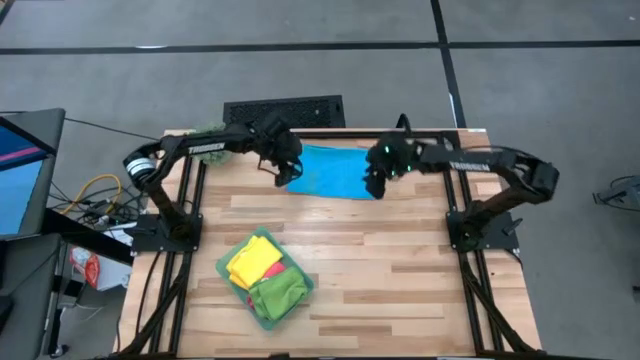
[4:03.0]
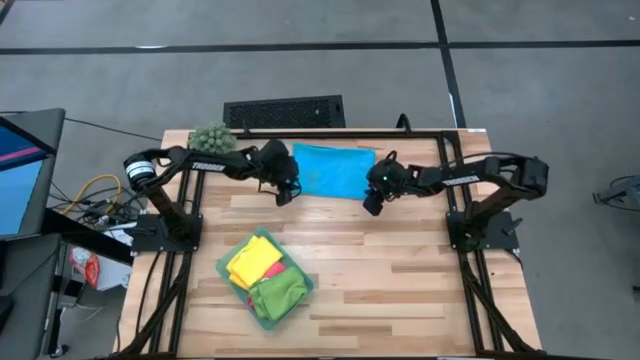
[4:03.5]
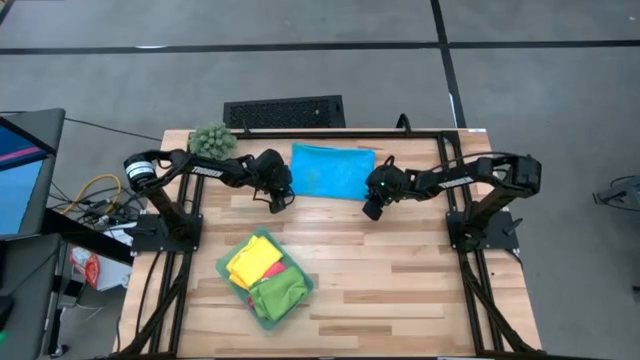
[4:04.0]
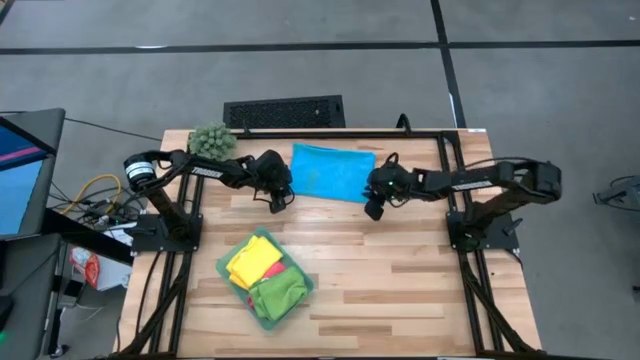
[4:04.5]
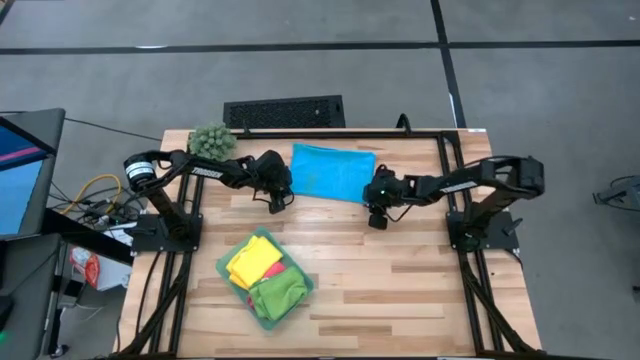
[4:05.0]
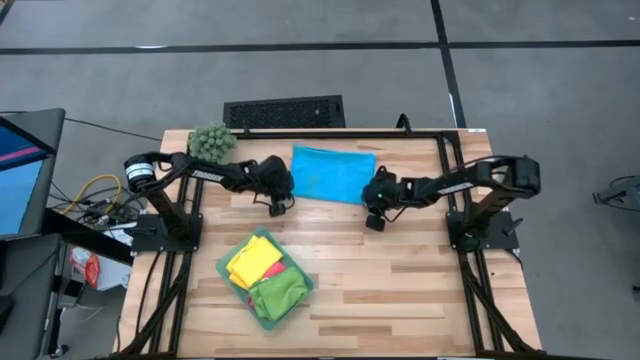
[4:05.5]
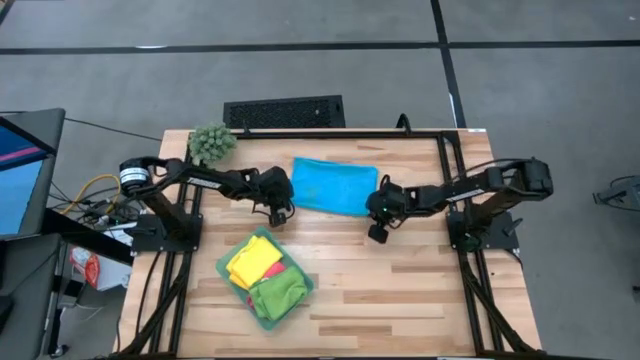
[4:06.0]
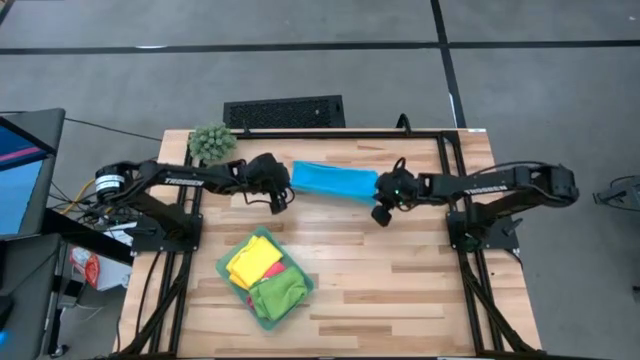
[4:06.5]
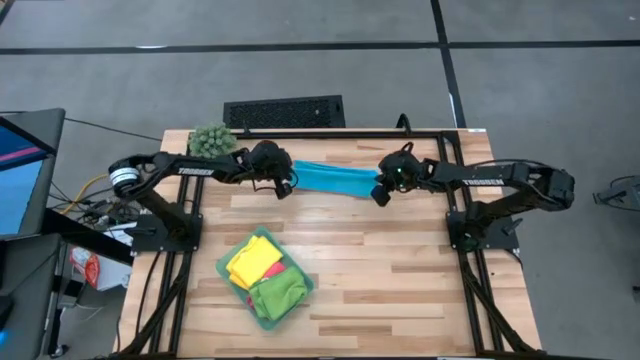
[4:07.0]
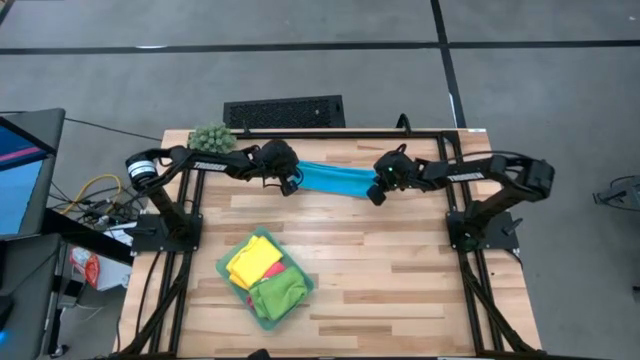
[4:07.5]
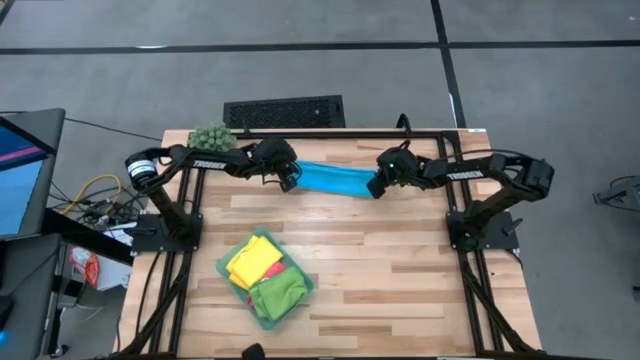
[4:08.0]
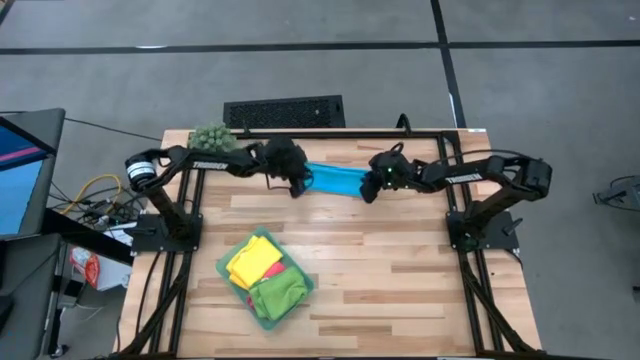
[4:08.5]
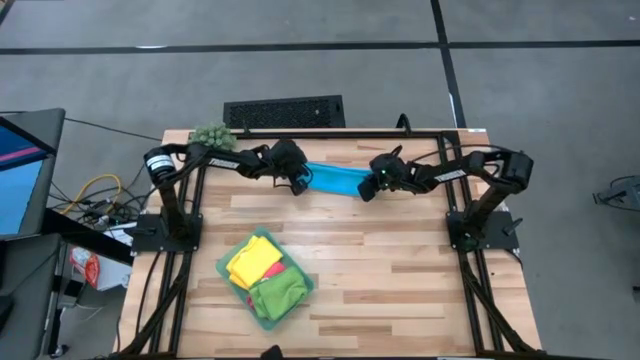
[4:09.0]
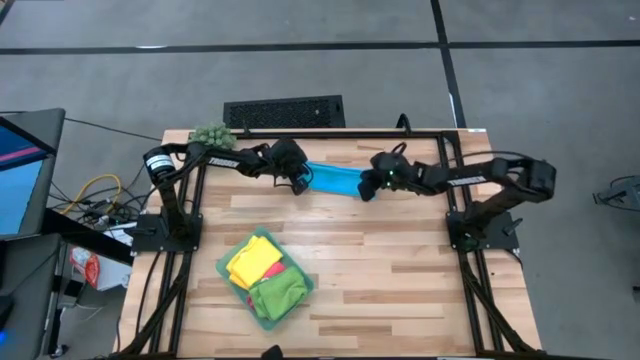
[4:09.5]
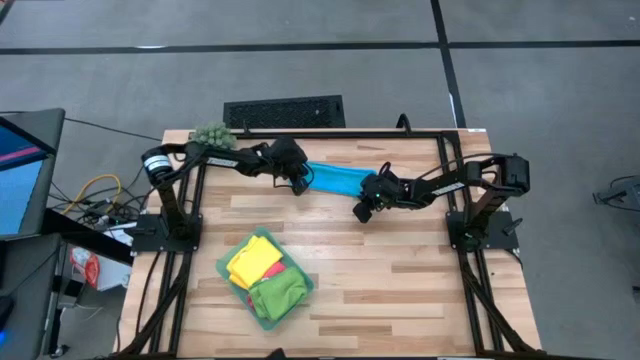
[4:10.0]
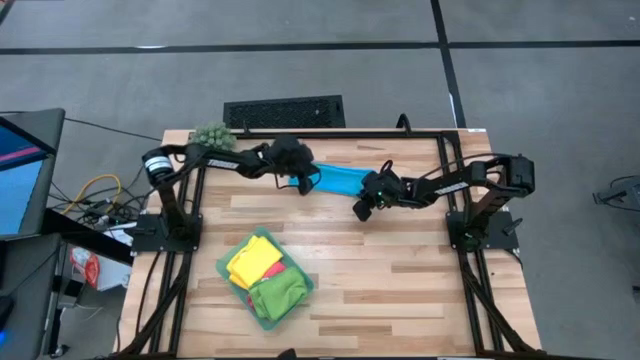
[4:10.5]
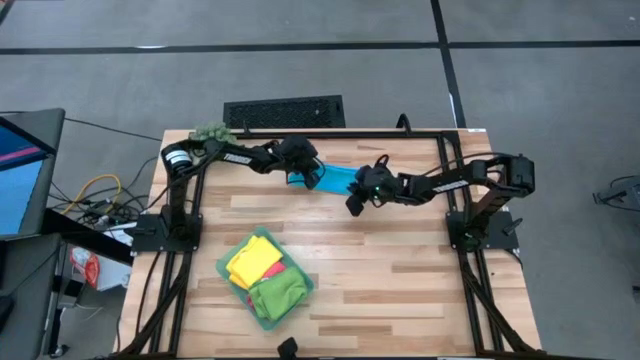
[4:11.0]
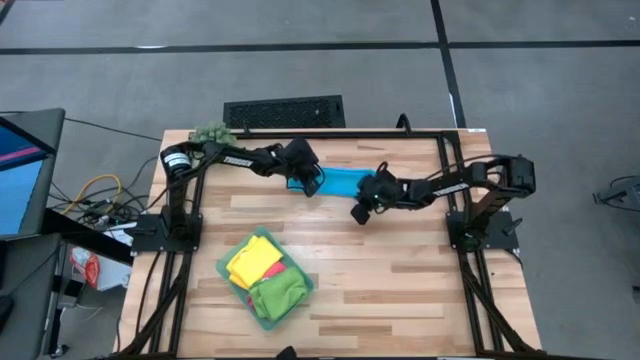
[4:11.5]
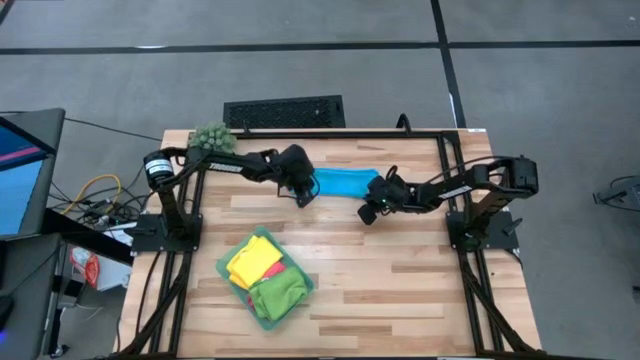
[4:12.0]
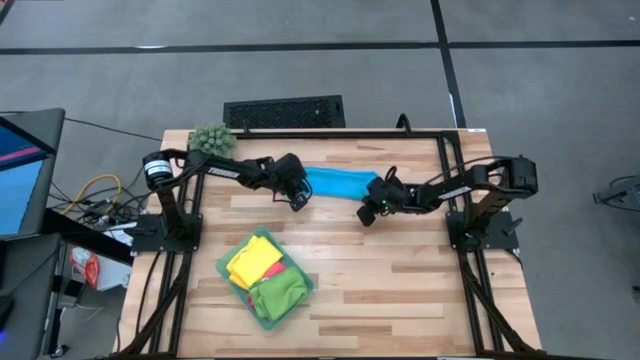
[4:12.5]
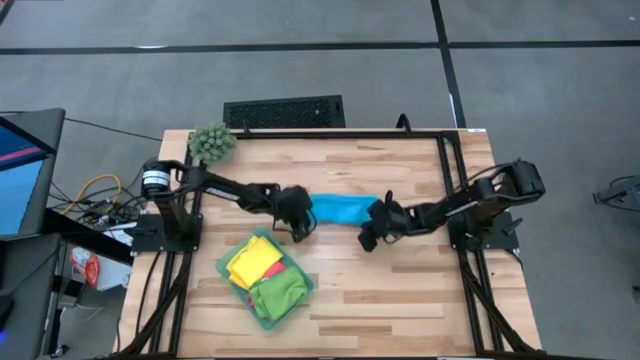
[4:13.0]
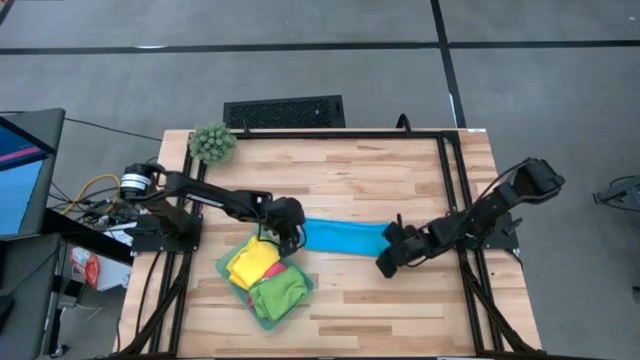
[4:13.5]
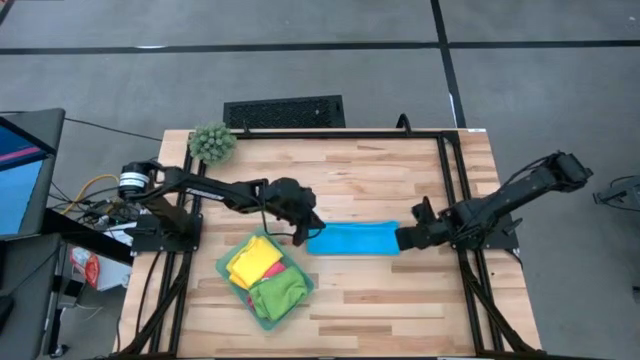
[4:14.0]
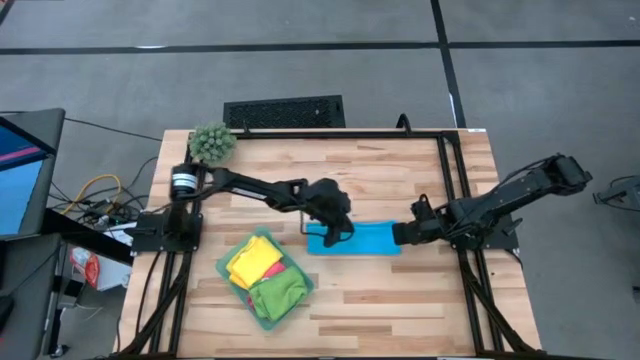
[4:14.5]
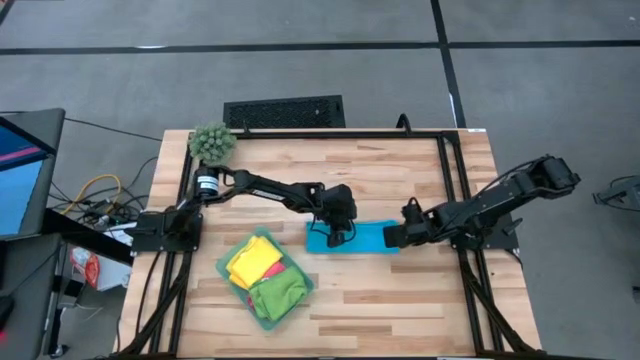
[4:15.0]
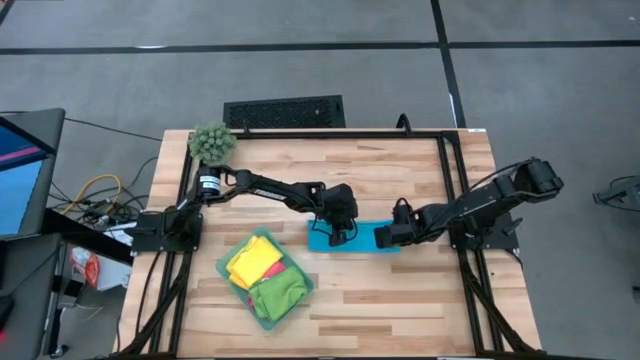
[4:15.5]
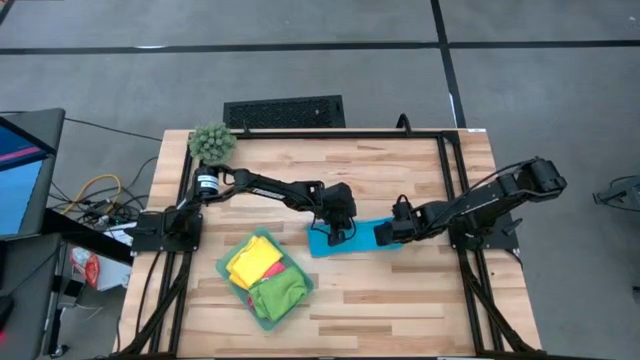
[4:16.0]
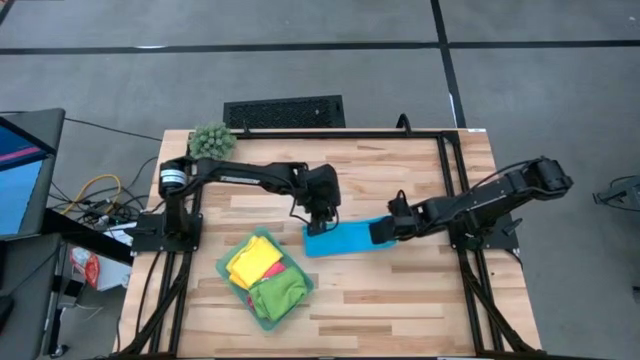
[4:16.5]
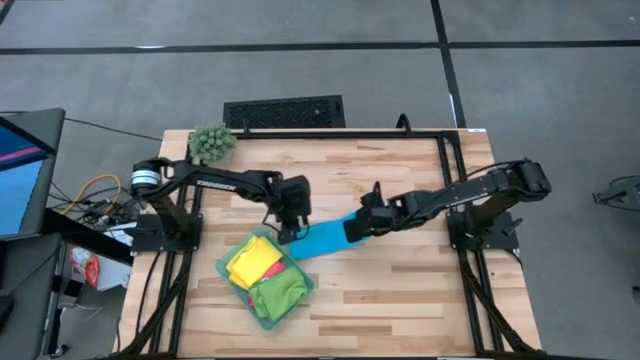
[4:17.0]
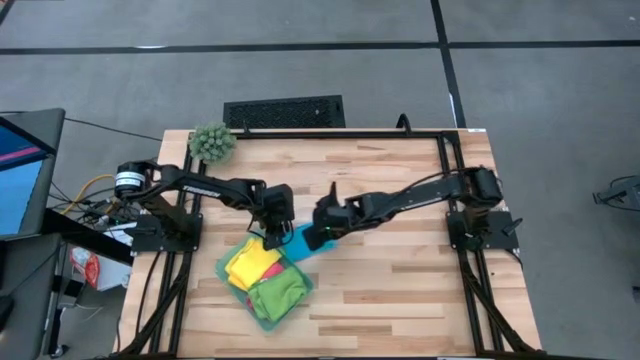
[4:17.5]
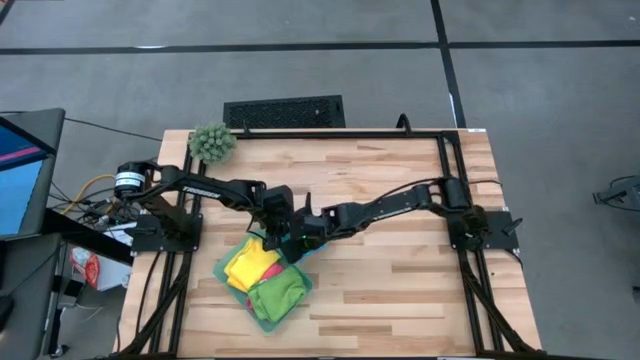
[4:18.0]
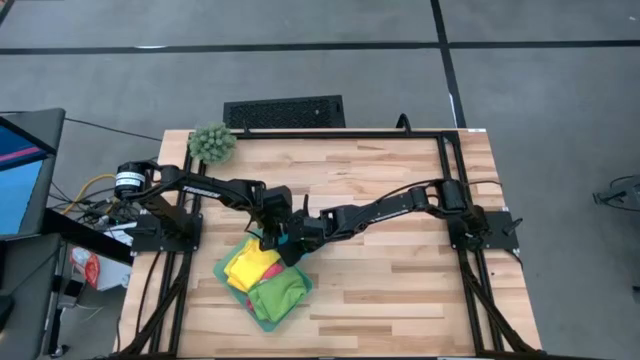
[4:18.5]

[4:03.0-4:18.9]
Task: Fold microfiber towels
Fold the blue towel
